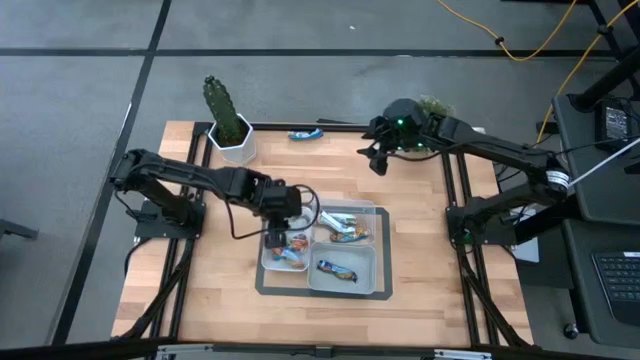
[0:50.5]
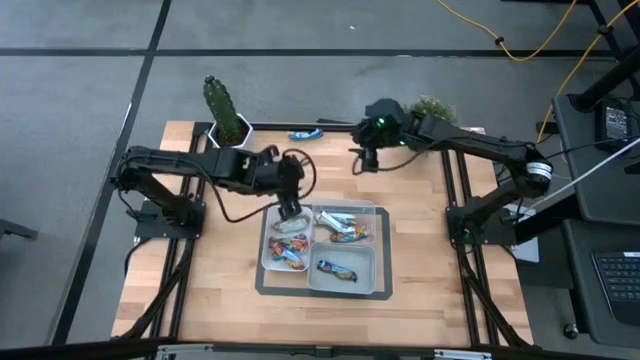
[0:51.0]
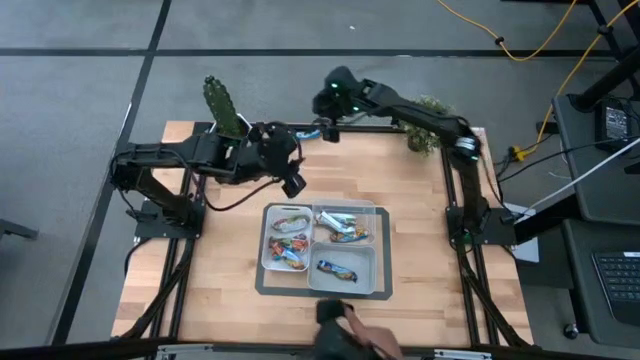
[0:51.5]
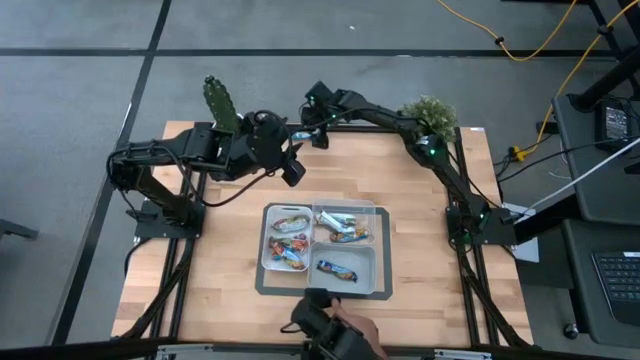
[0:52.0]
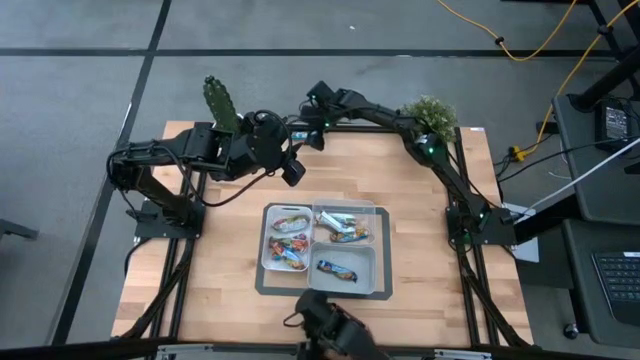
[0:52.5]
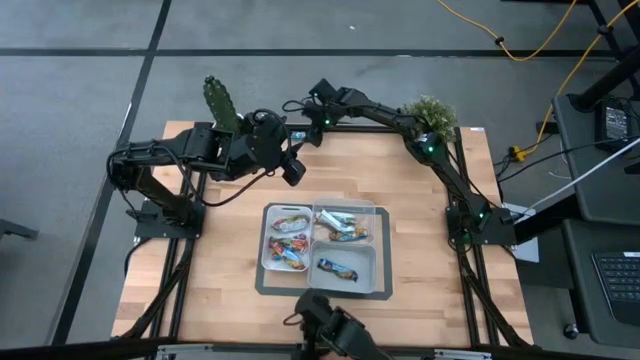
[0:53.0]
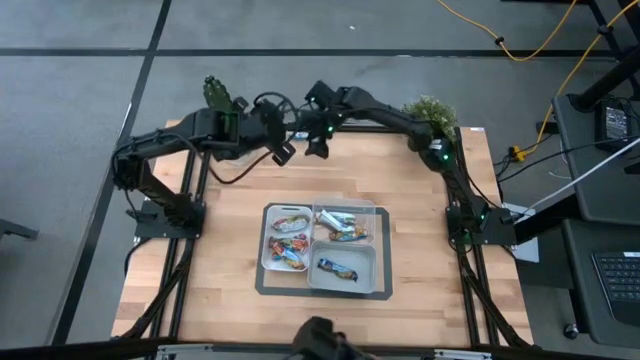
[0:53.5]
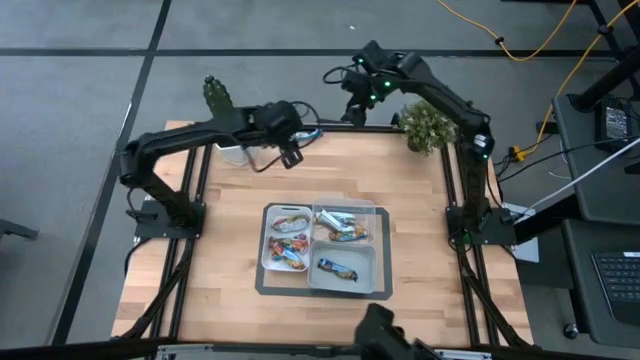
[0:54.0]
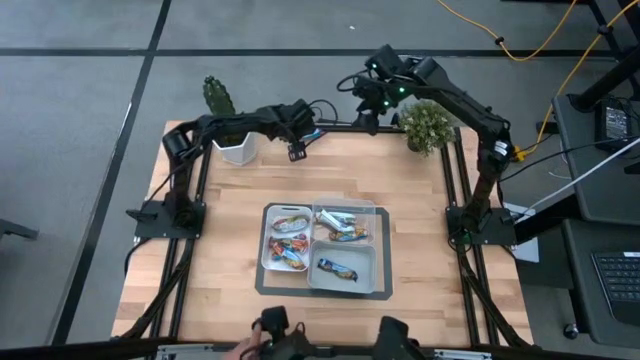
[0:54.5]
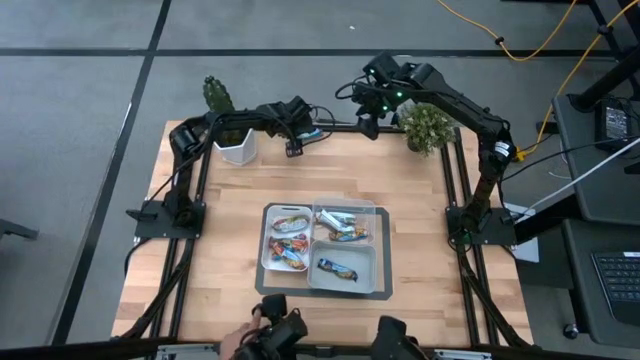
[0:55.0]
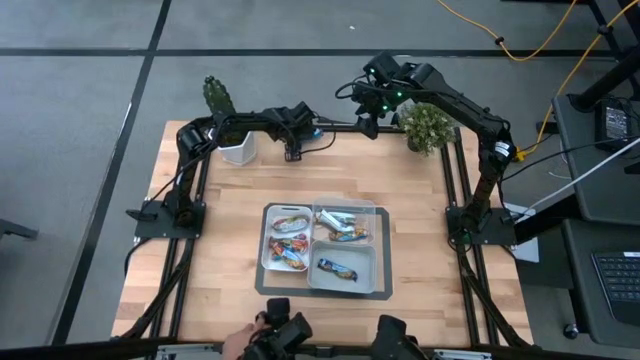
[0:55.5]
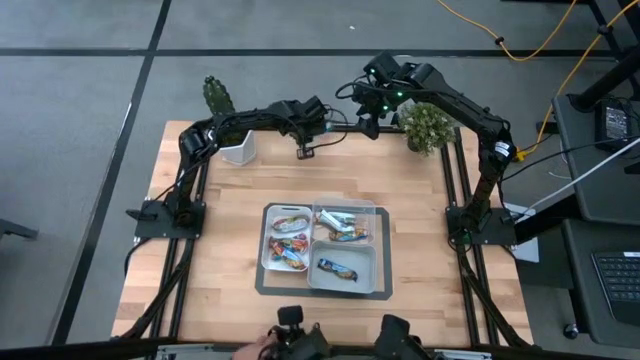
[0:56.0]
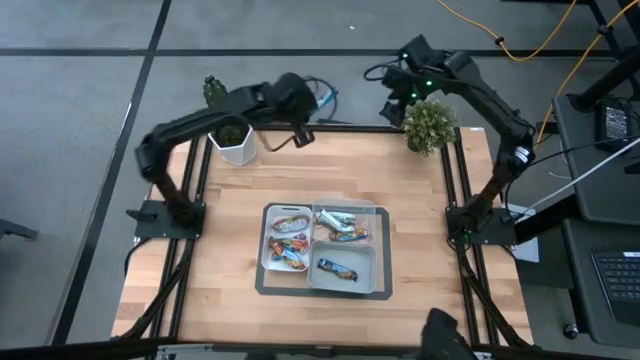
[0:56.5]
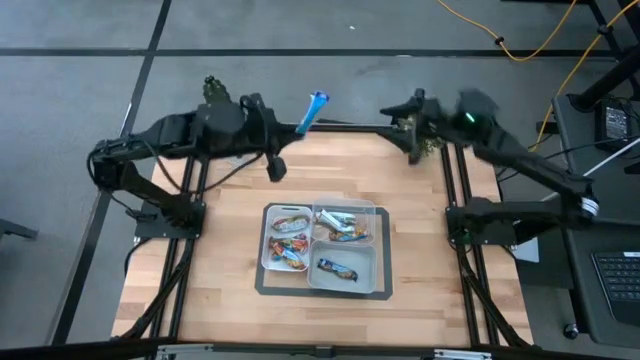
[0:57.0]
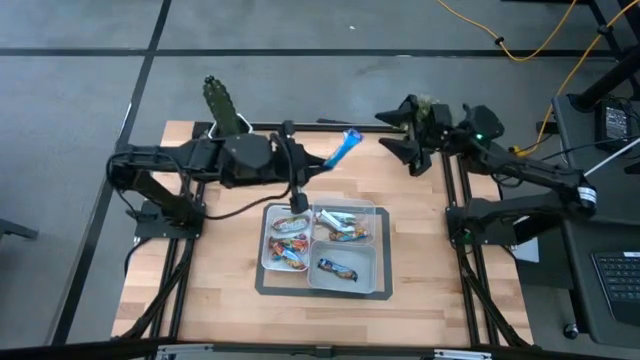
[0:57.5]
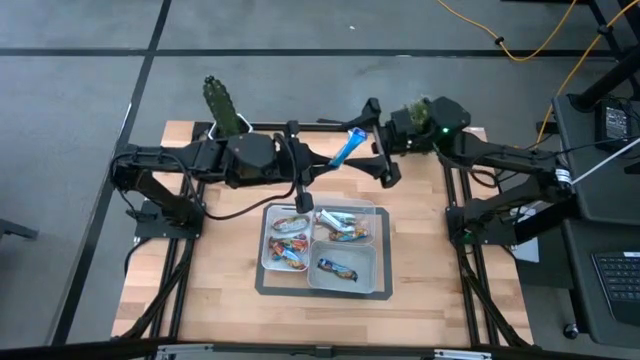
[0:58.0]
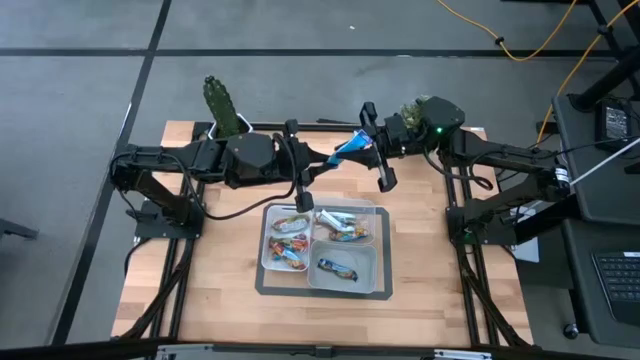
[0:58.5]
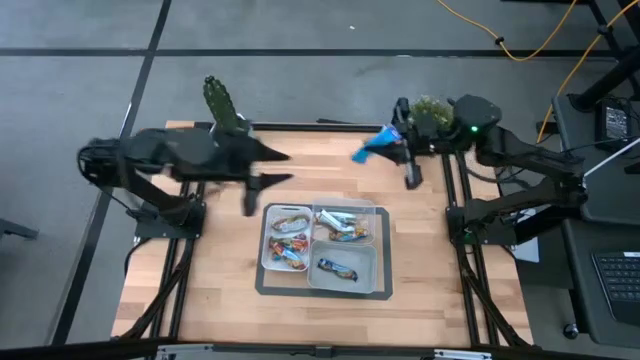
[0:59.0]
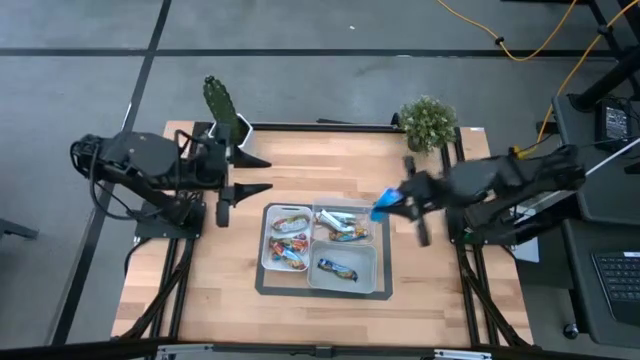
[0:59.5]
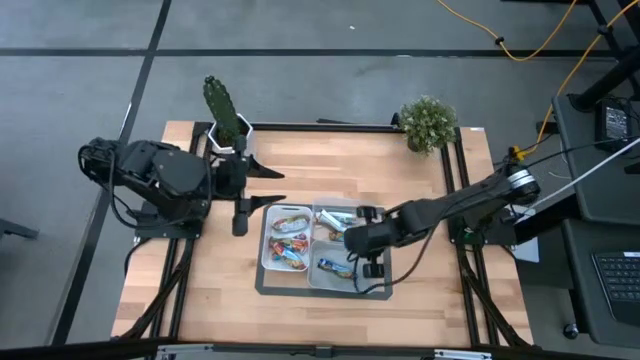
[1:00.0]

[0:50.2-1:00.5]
Task: Pick and place Granola Bars by type
Put the blue granola bar into the gray bin

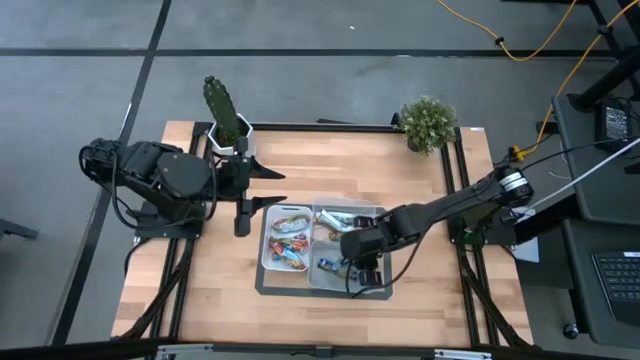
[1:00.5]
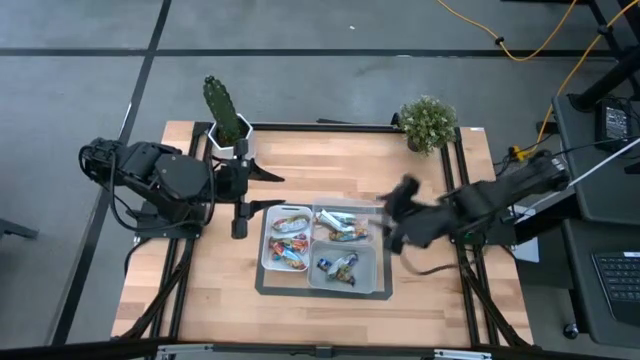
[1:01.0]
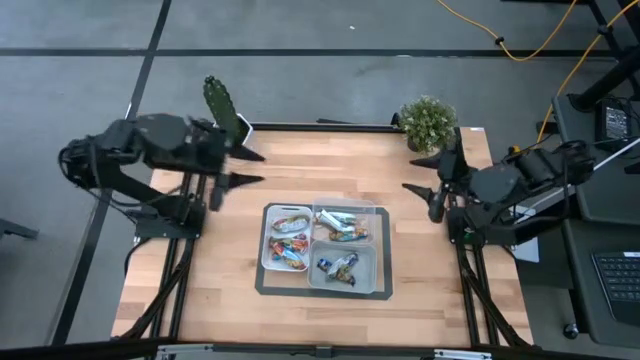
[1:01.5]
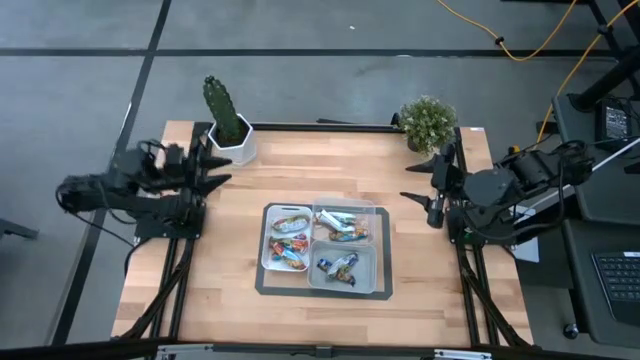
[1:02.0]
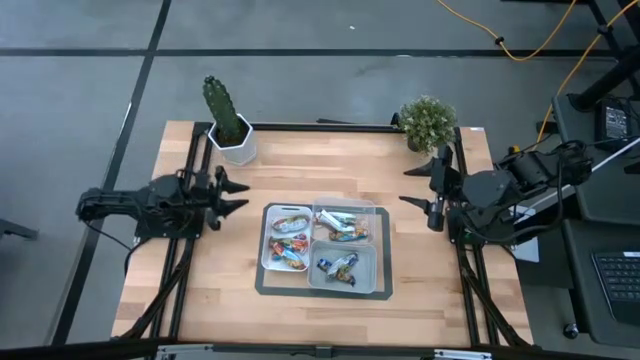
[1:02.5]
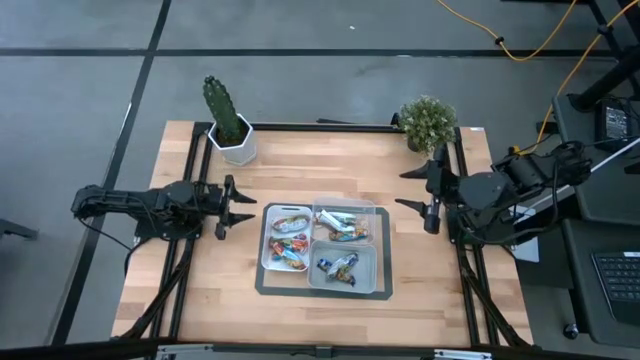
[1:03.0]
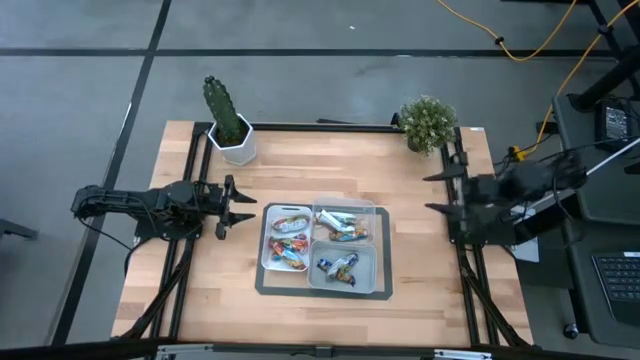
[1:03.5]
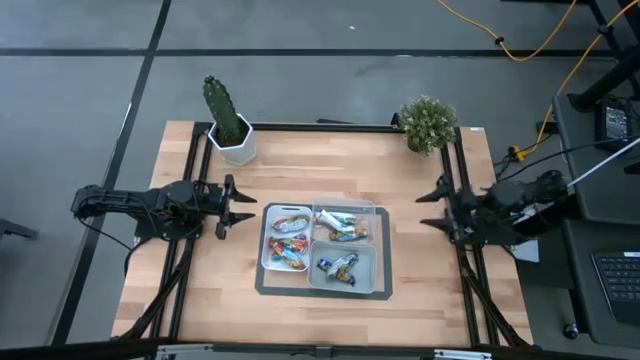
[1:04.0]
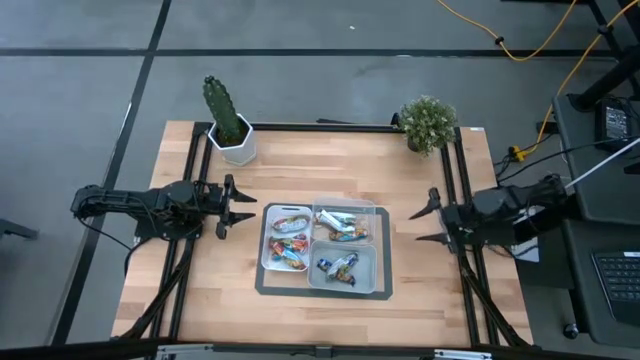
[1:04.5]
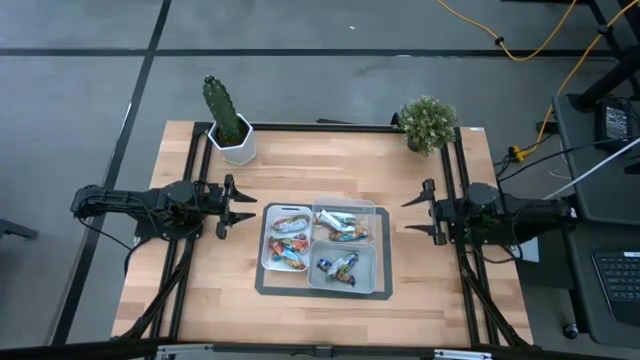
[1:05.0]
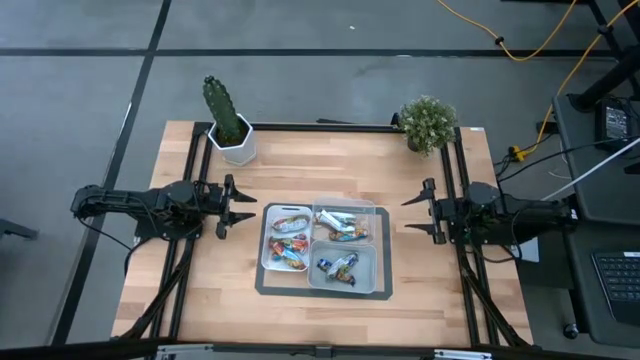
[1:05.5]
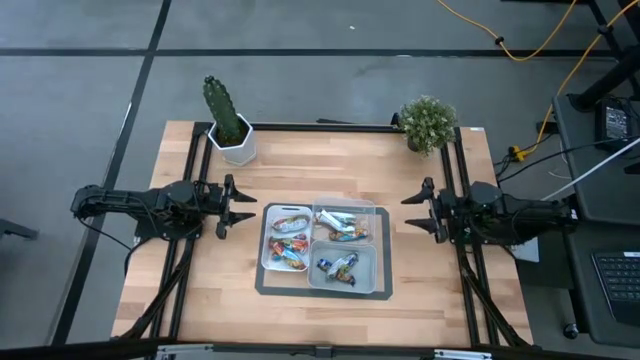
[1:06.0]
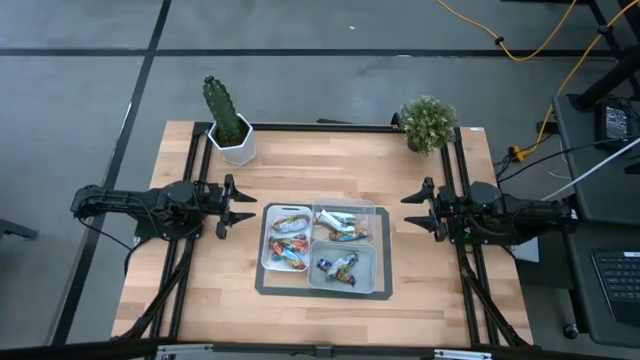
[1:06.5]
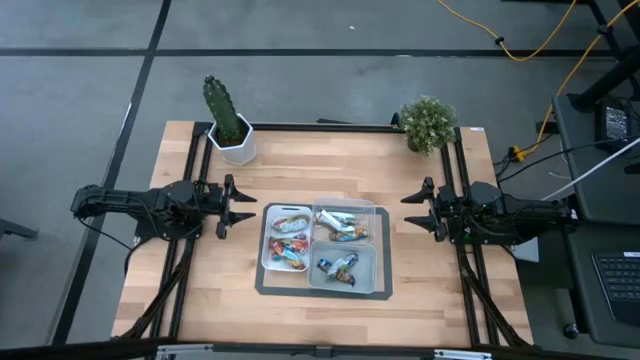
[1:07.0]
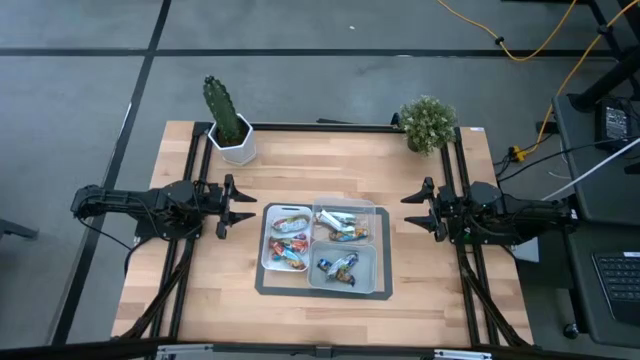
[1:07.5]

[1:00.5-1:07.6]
Return to Home Position

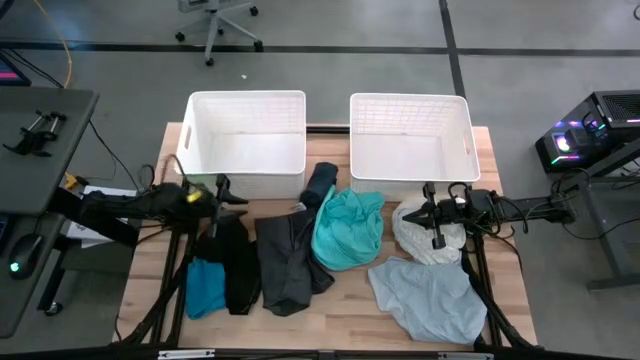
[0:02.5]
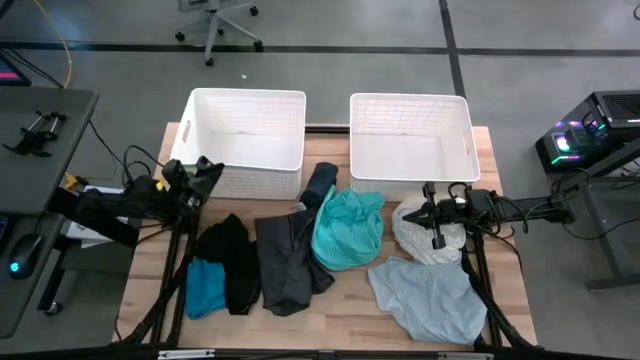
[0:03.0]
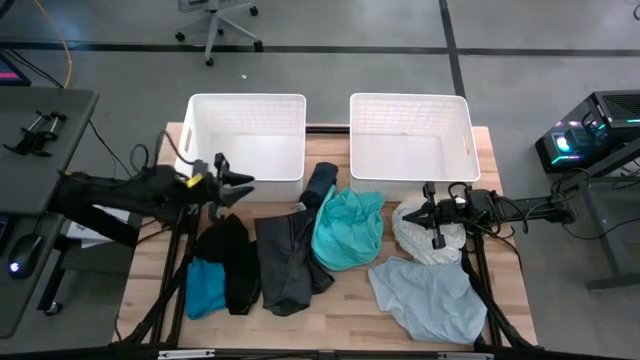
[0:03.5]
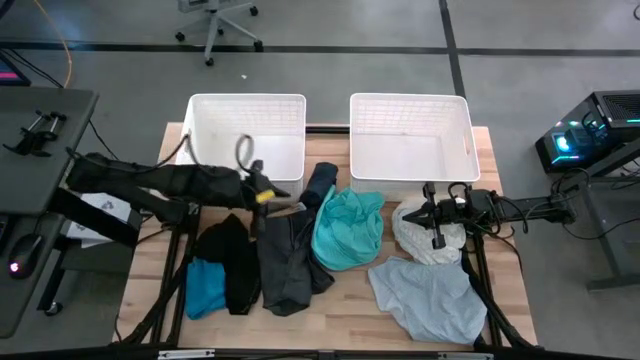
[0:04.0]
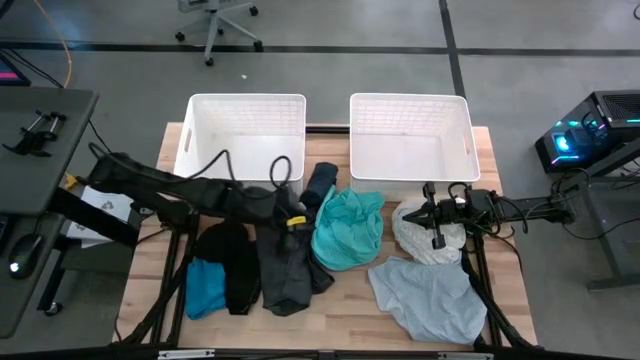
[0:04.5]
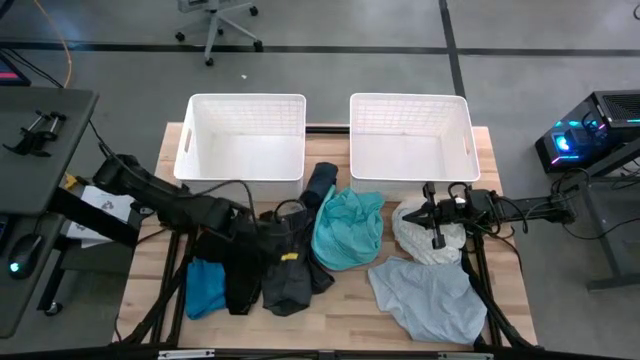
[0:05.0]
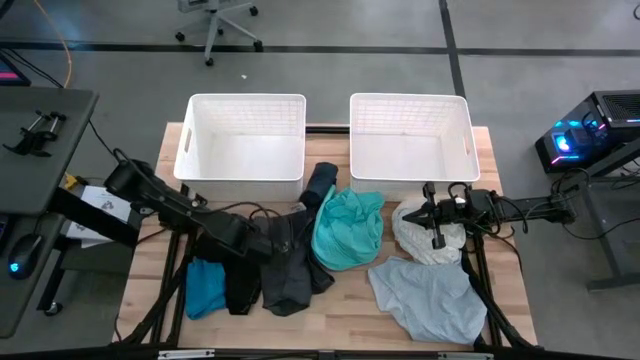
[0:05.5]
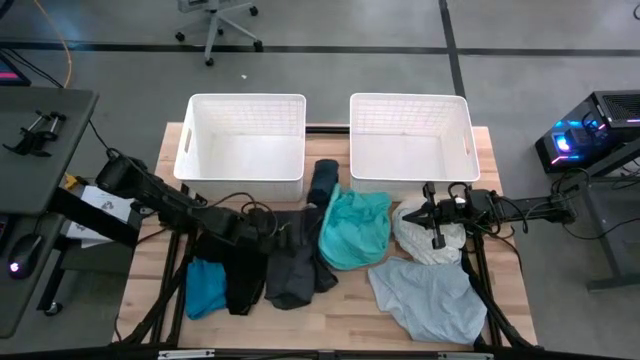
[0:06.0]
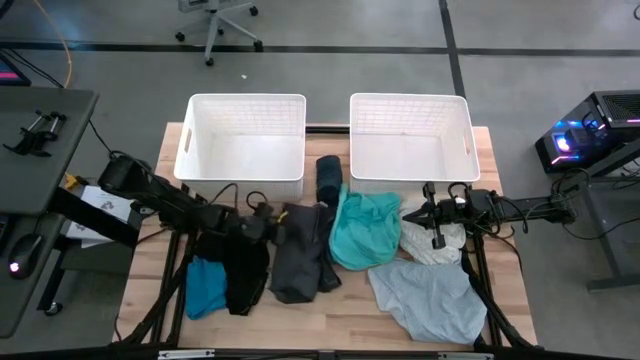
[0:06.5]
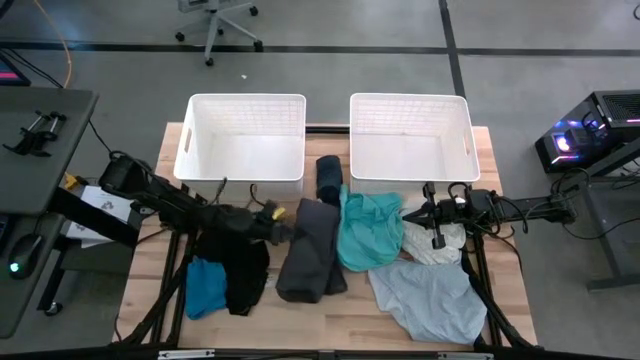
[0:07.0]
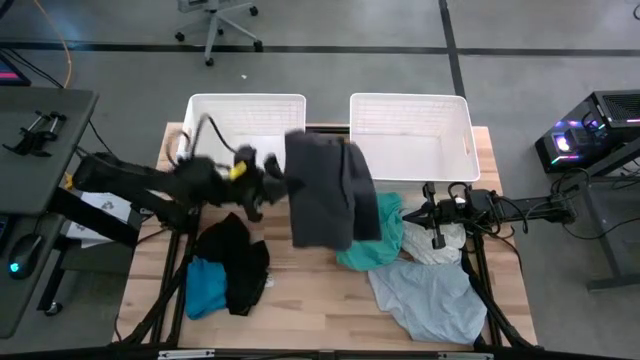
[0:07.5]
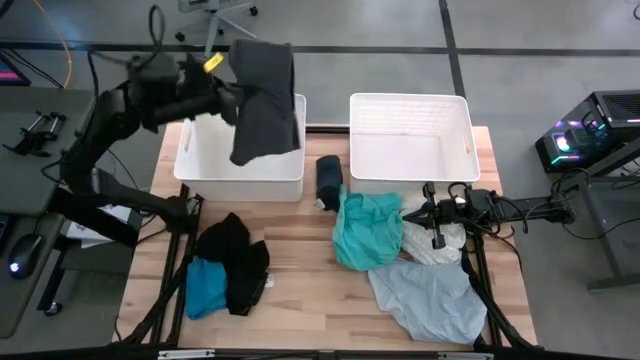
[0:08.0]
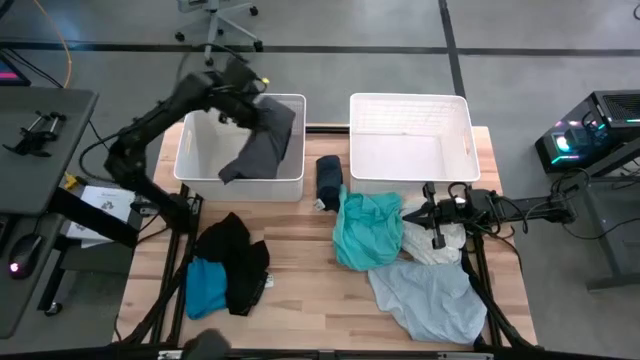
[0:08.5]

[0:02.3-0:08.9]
Task: Sort clothes
Put the gray short into the left white laundry bin
